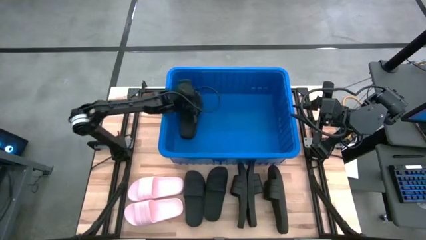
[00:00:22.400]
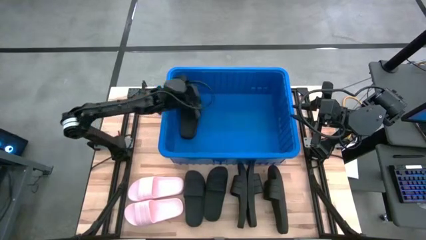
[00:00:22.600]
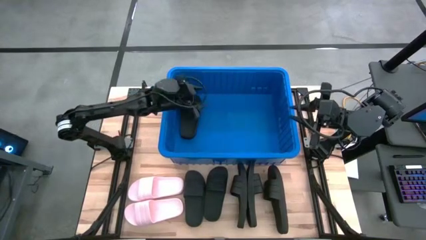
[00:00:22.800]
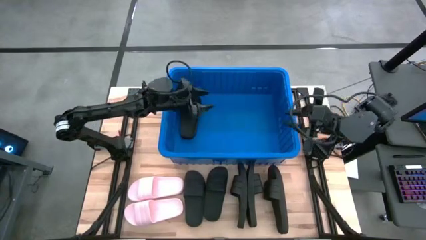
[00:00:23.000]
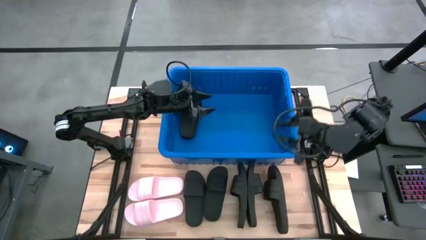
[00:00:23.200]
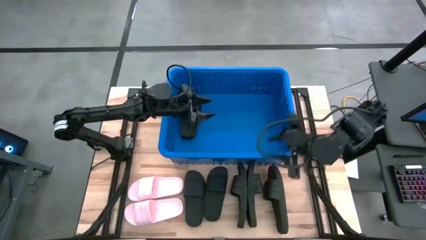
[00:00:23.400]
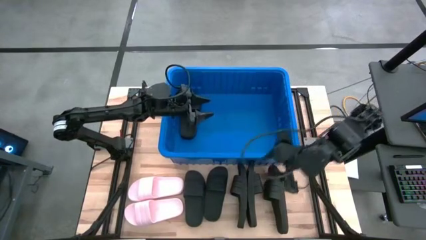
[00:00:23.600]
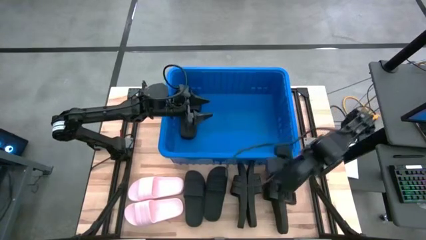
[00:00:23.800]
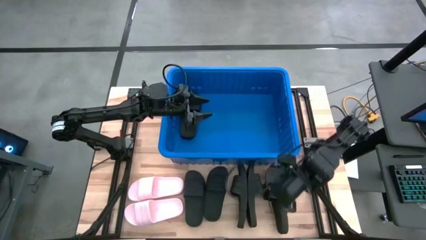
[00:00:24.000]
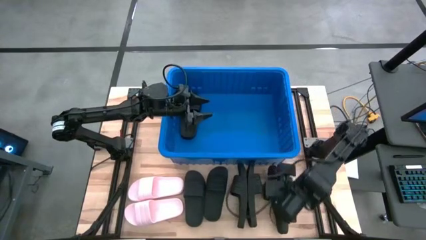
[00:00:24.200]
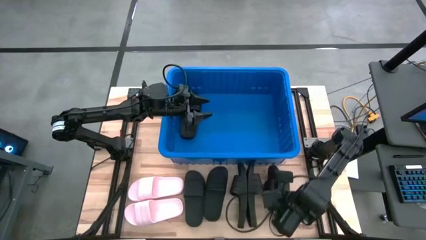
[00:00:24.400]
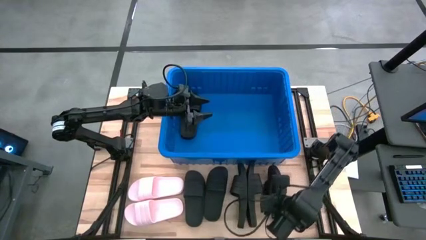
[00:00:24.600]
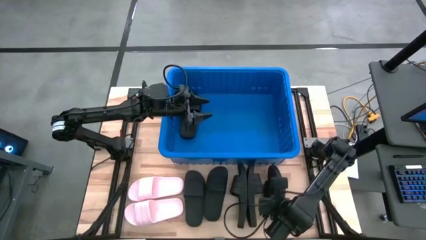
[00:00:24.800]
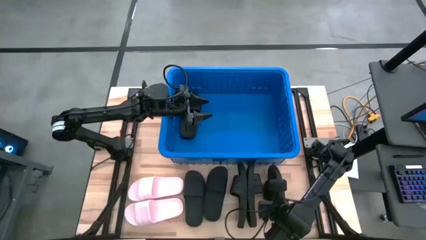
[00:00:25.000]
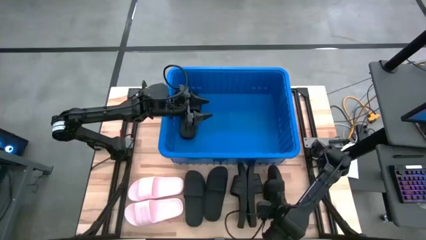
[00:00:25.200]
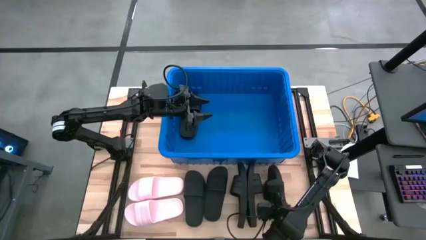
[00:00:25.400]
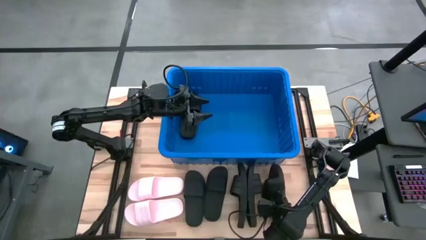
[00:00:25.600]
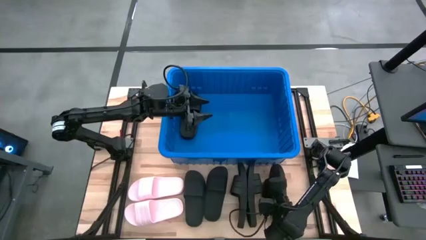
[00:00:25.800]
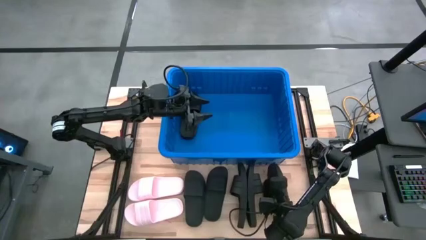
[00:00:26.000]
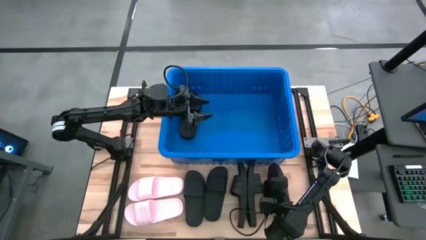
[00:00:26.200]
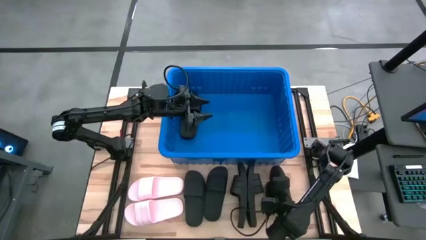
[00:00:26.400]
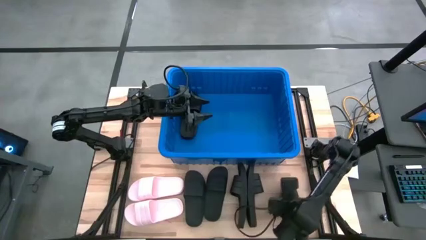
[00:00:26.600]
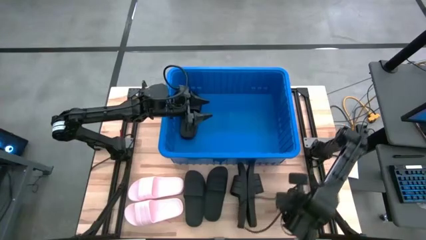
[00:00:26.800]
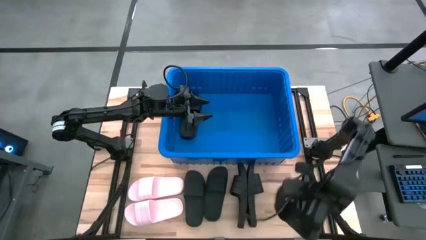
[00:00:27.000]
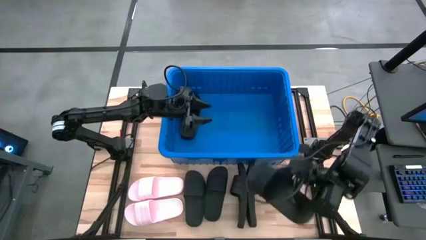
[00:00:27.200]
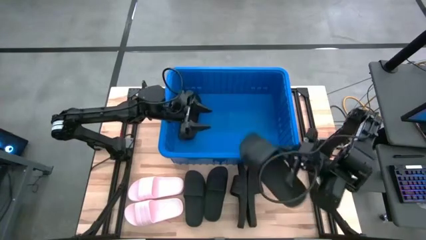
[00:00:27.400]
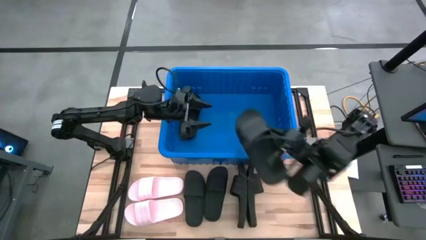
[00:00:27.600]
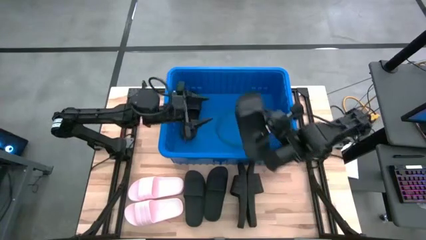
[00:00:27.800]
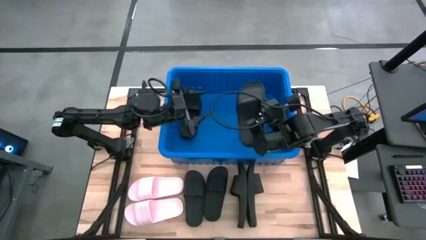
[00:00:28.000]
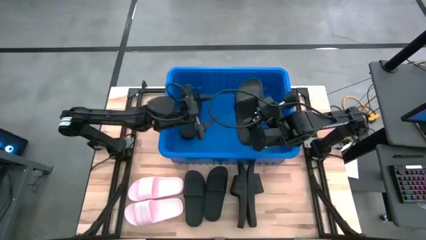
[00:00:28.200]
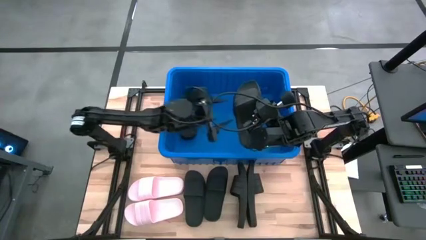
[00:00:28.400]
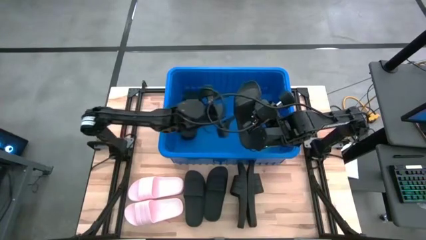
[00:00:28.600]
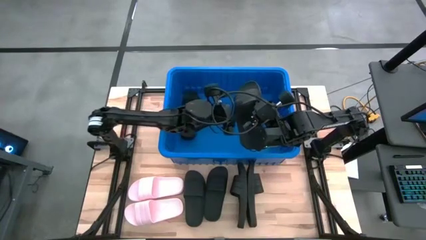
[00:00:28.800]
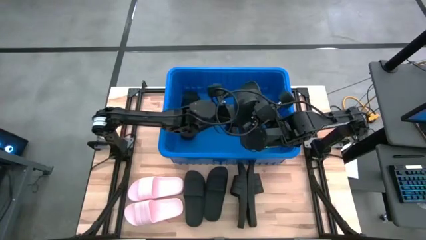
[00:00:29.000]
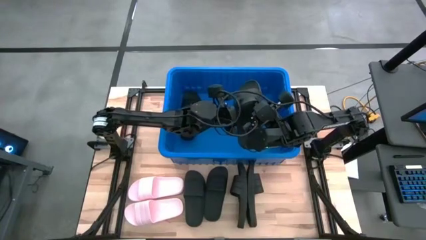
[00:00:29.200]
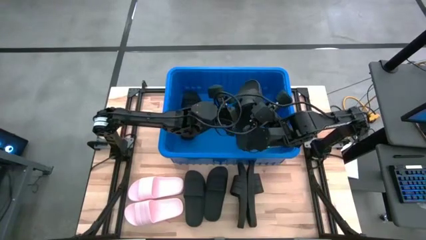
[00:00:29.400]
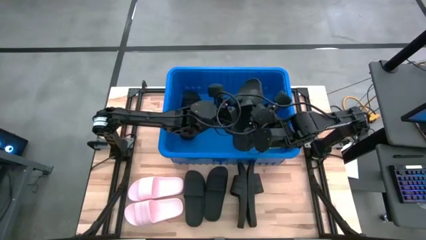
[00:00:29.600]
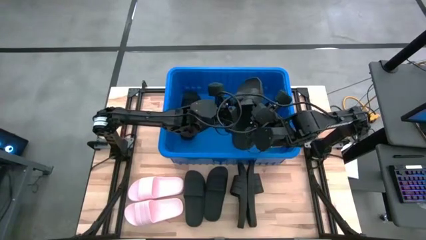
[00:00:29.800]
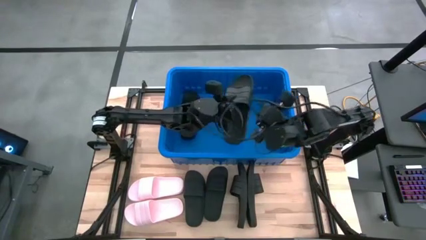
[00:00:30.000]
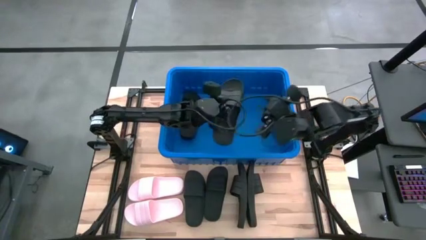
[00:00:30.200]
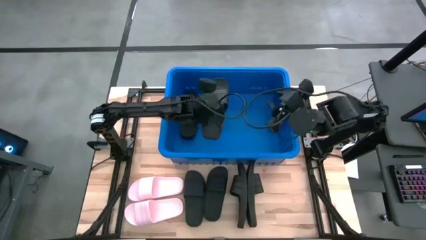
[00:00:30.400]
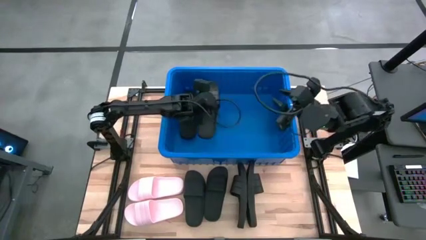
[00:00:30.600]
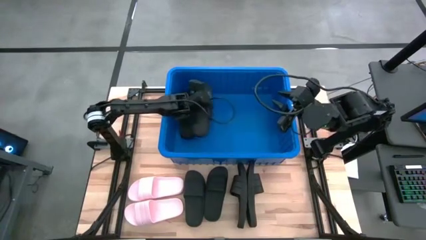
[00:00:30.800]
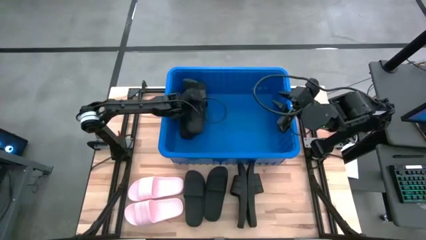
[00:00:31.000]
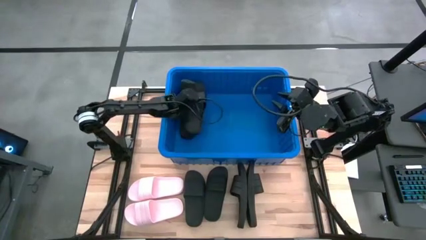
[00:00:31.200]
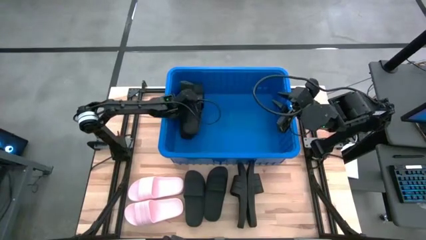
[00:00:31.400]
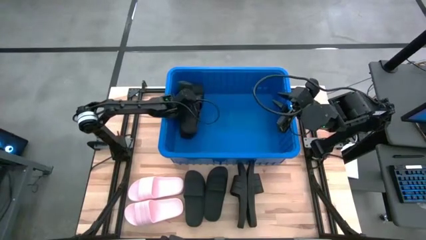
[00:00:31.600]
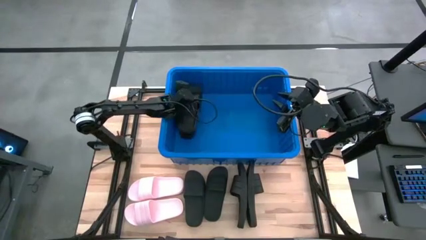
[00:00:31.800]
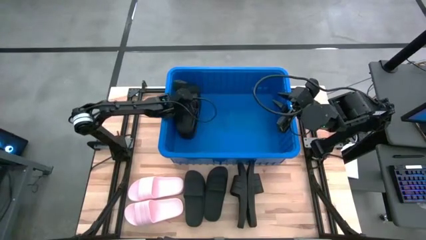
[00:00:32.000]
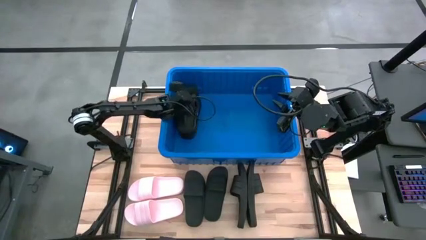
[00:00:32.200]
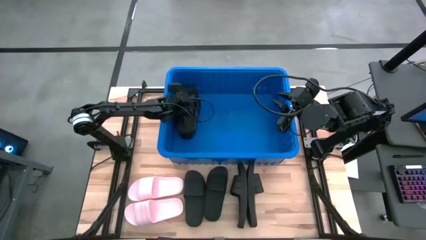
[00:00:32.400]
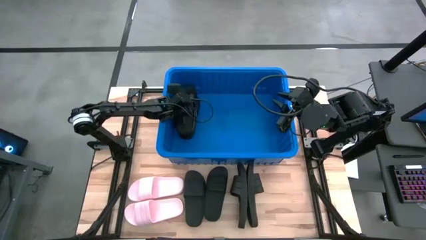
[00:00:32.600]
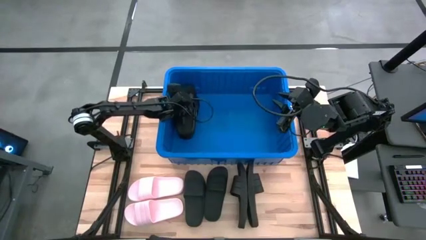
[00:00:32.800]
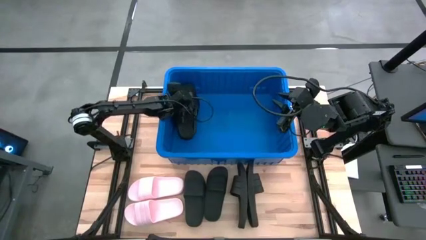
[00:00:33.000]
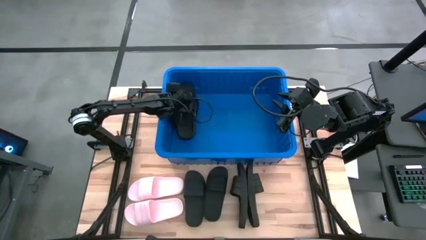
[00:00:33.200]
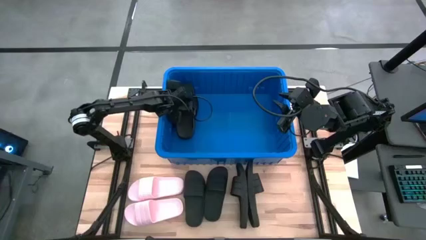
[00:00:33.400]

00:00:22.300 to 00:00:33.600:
Task: Pick and place slides into bin
Put the black slide into the blue organizer bin
